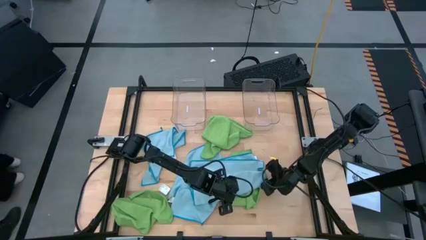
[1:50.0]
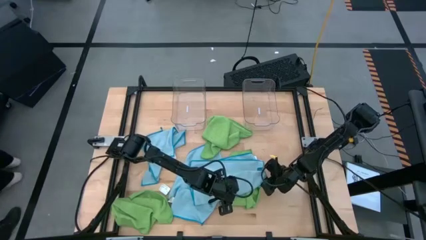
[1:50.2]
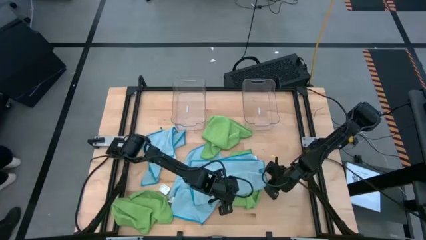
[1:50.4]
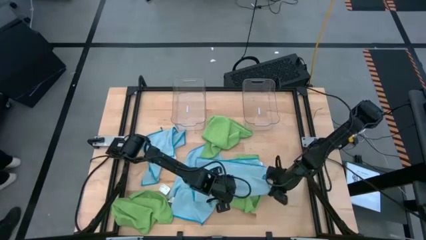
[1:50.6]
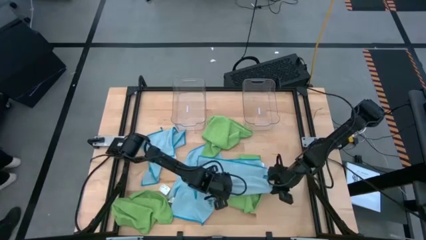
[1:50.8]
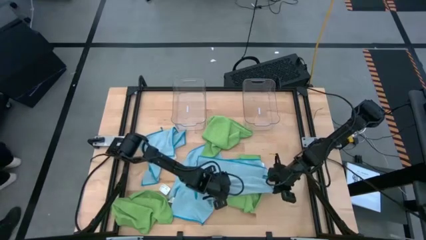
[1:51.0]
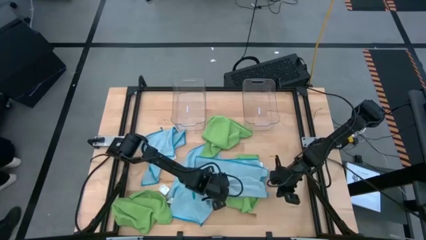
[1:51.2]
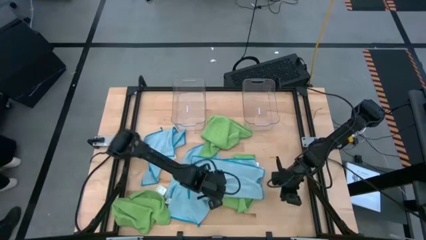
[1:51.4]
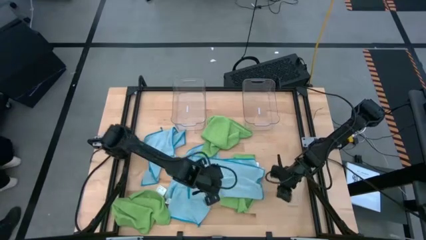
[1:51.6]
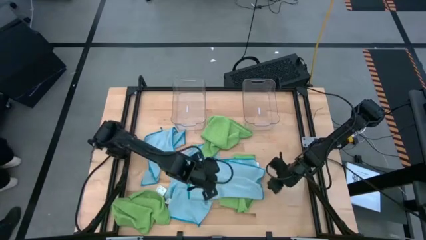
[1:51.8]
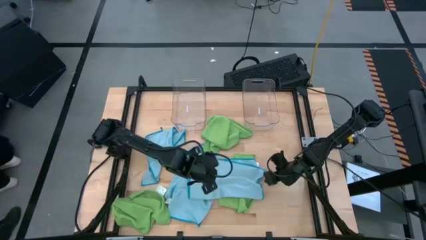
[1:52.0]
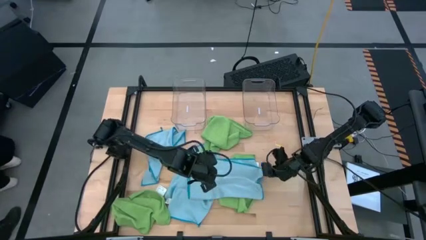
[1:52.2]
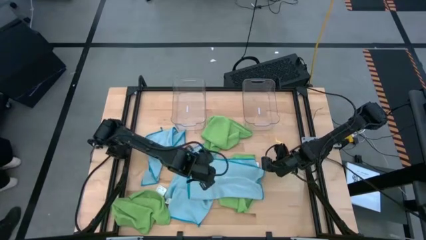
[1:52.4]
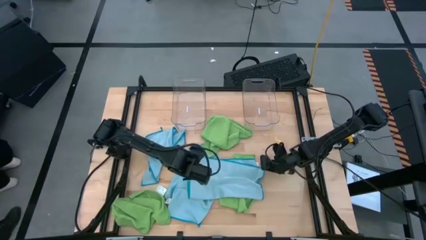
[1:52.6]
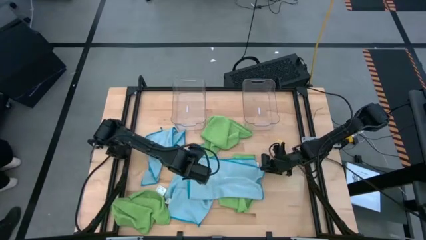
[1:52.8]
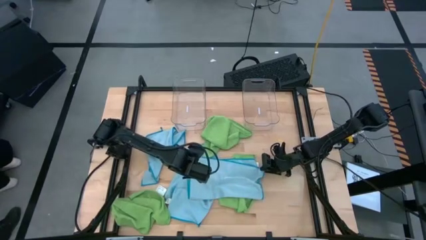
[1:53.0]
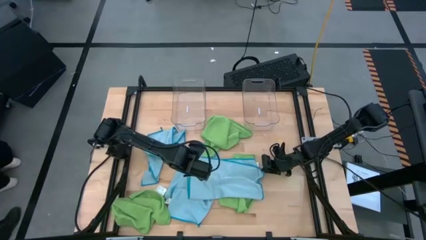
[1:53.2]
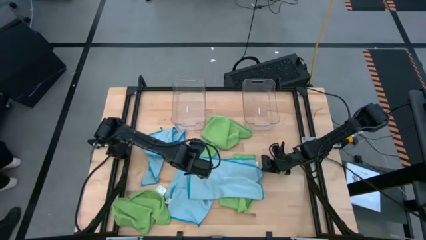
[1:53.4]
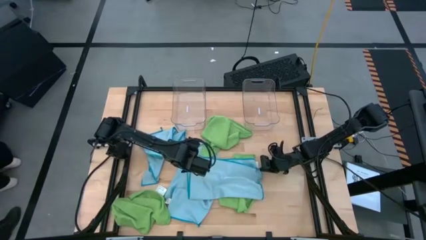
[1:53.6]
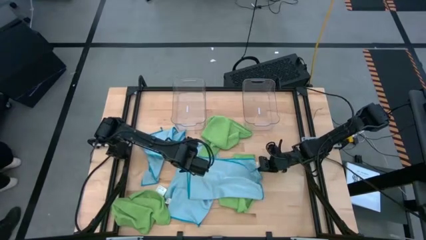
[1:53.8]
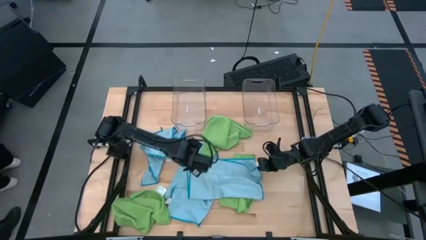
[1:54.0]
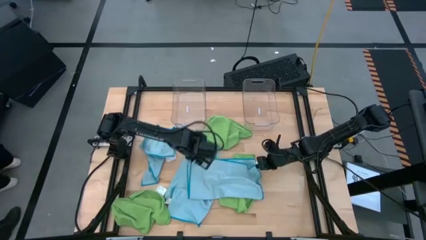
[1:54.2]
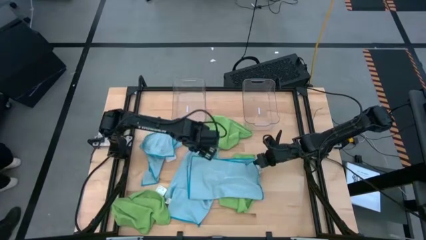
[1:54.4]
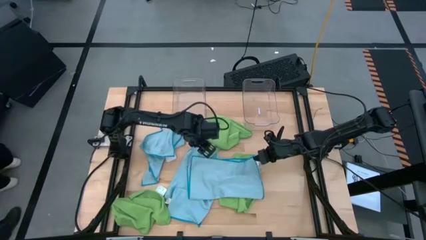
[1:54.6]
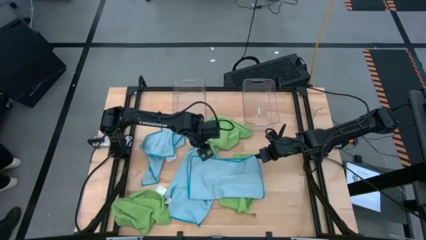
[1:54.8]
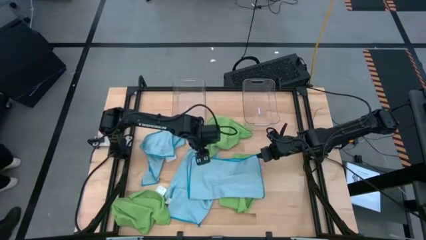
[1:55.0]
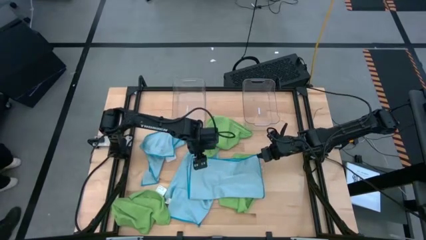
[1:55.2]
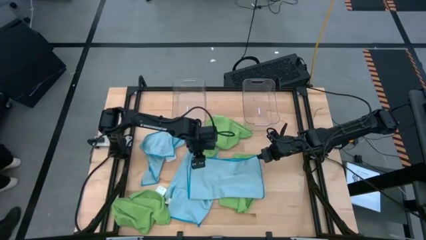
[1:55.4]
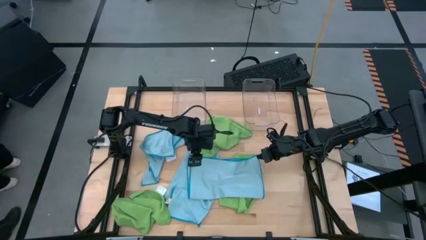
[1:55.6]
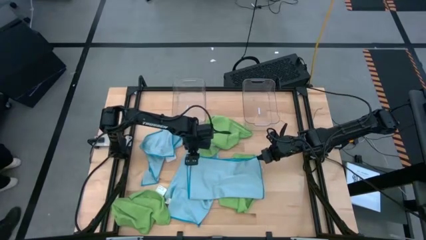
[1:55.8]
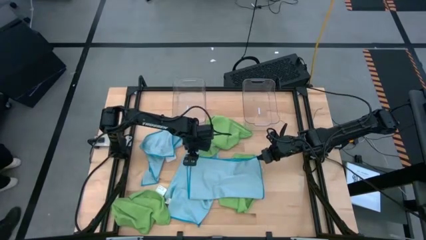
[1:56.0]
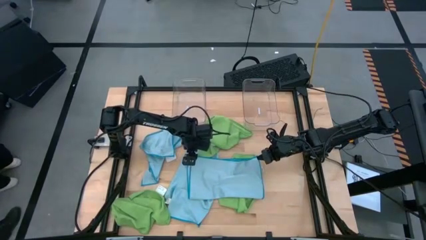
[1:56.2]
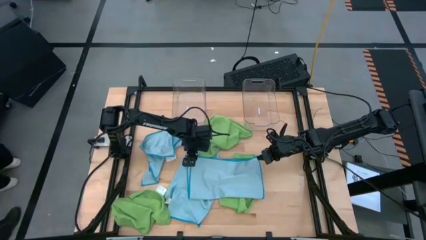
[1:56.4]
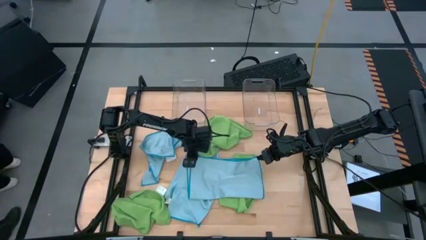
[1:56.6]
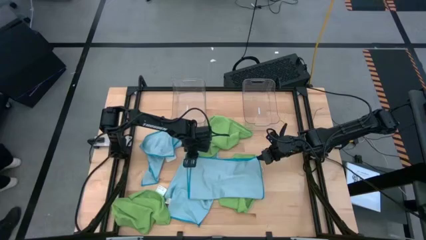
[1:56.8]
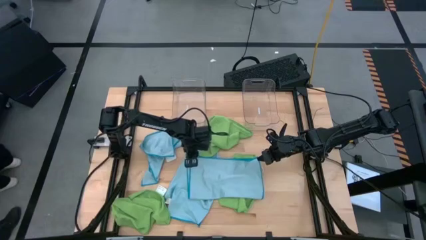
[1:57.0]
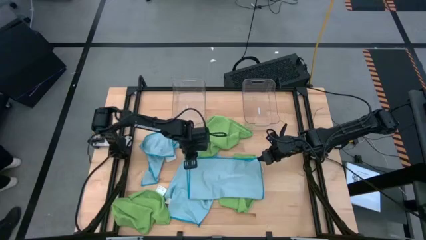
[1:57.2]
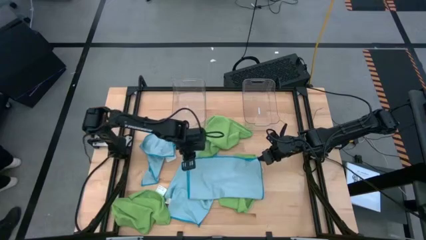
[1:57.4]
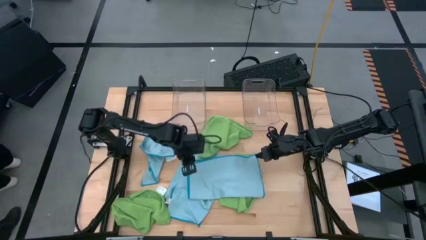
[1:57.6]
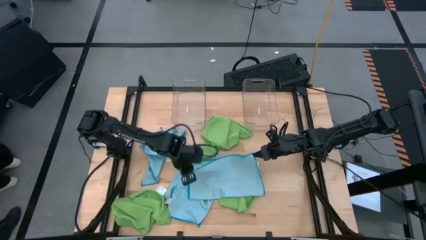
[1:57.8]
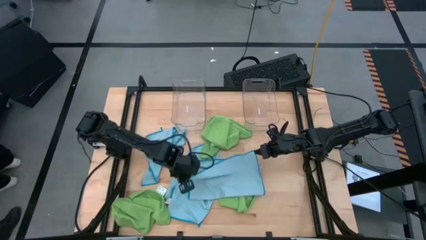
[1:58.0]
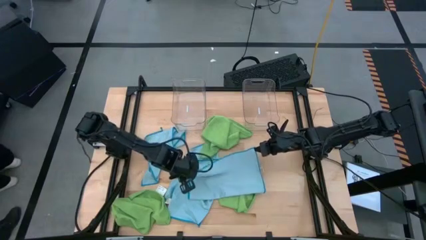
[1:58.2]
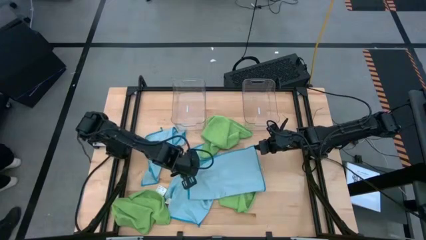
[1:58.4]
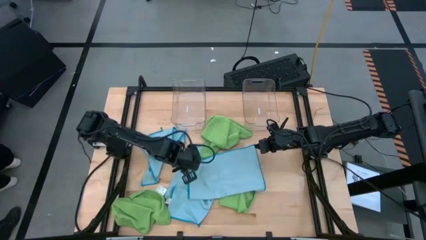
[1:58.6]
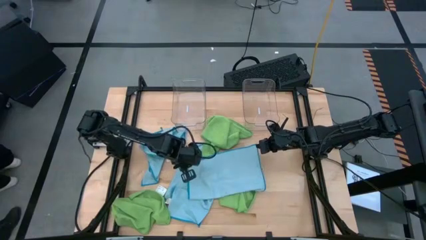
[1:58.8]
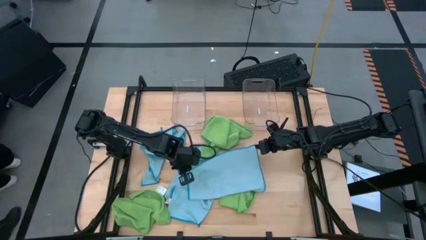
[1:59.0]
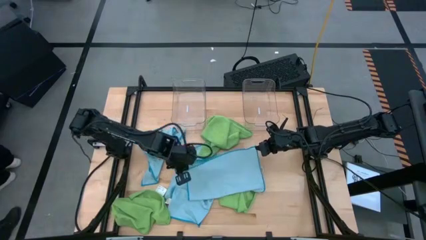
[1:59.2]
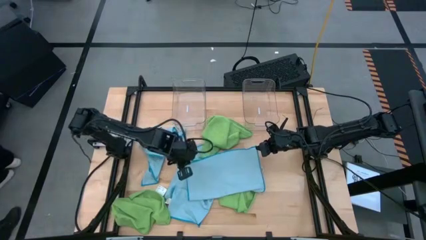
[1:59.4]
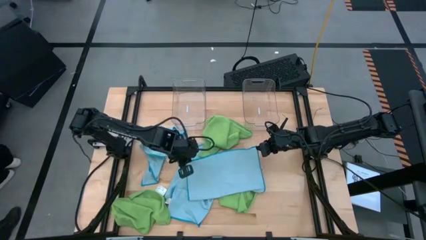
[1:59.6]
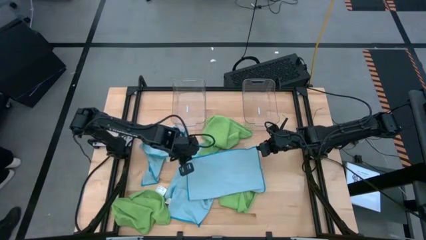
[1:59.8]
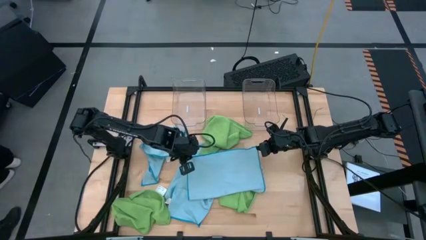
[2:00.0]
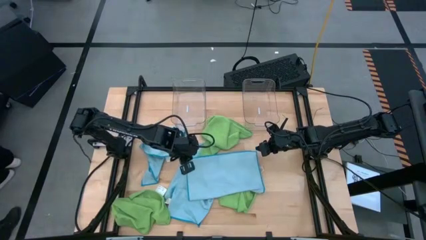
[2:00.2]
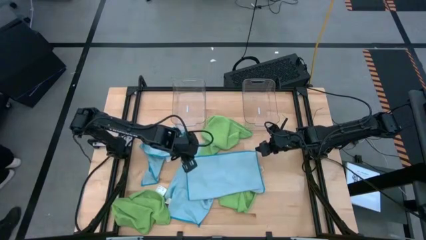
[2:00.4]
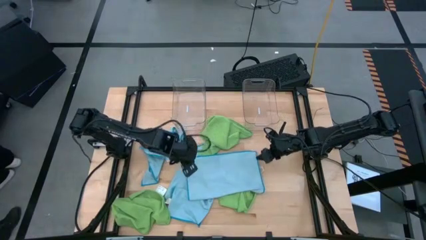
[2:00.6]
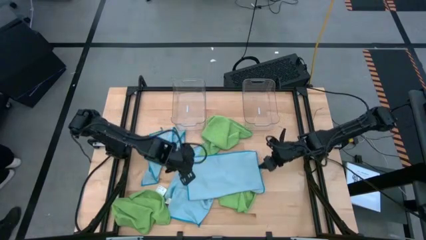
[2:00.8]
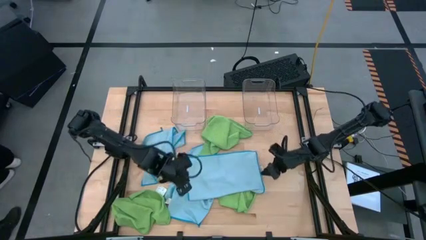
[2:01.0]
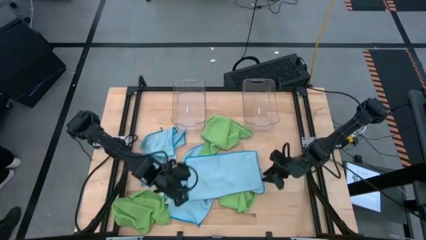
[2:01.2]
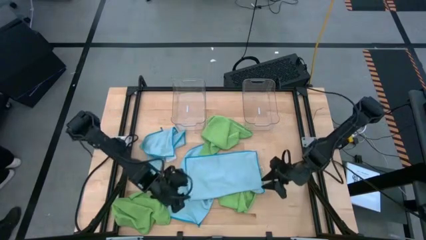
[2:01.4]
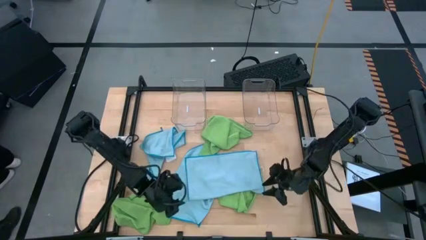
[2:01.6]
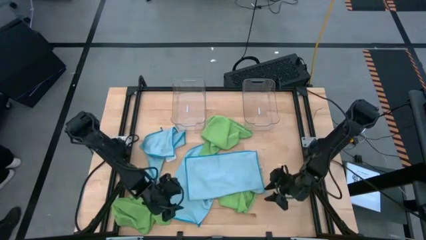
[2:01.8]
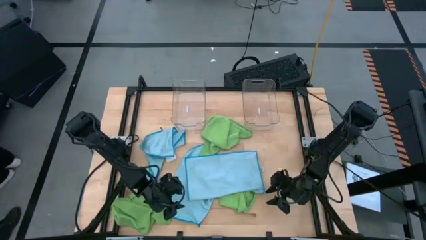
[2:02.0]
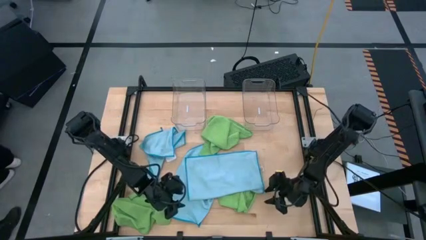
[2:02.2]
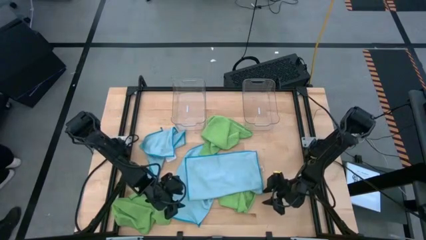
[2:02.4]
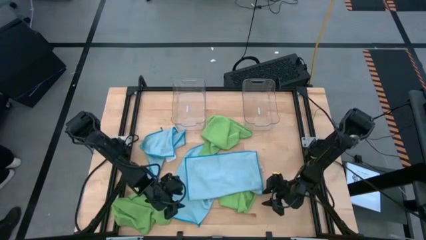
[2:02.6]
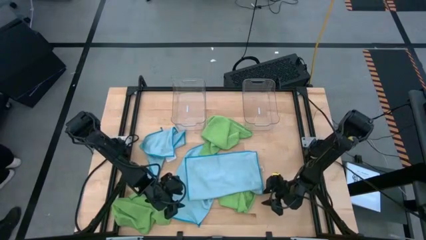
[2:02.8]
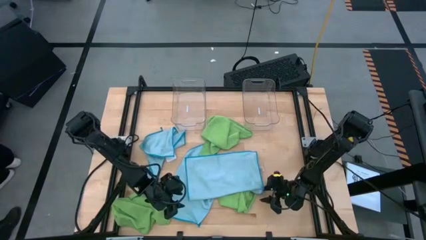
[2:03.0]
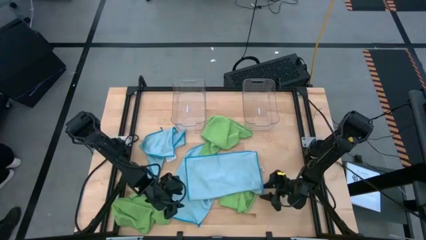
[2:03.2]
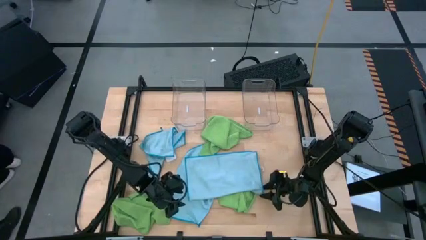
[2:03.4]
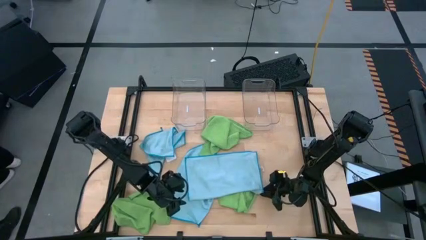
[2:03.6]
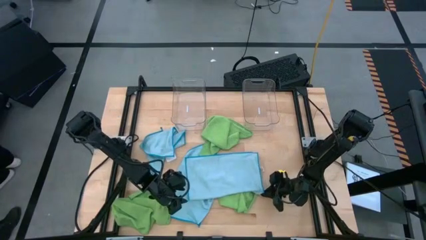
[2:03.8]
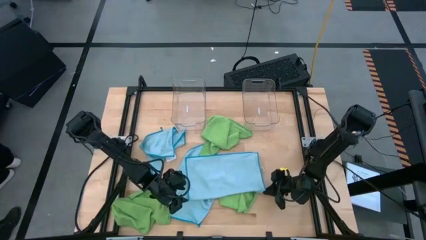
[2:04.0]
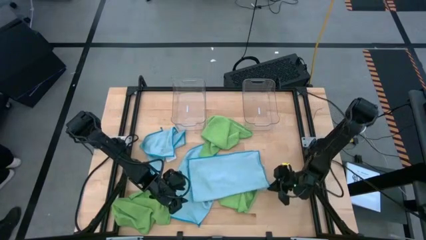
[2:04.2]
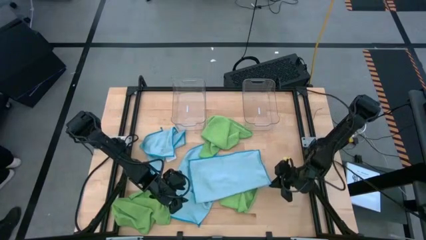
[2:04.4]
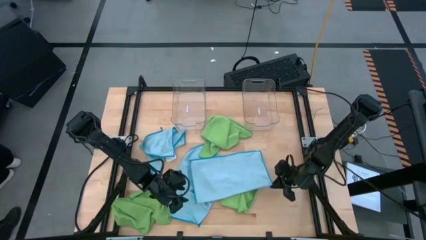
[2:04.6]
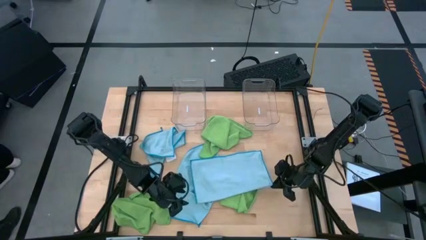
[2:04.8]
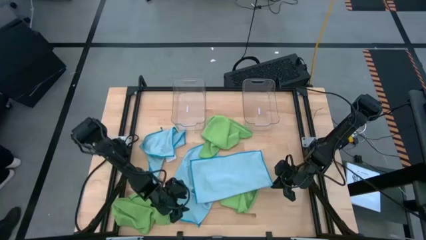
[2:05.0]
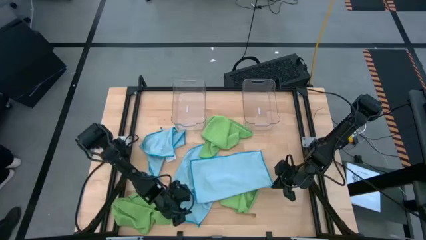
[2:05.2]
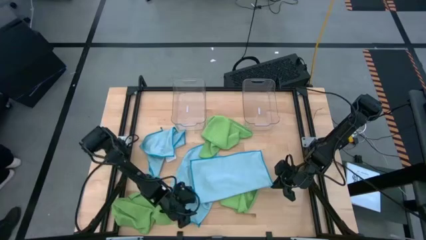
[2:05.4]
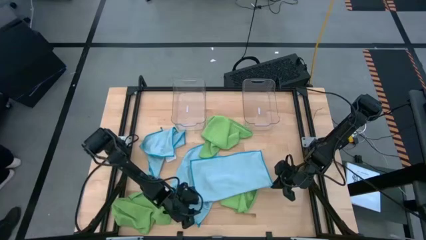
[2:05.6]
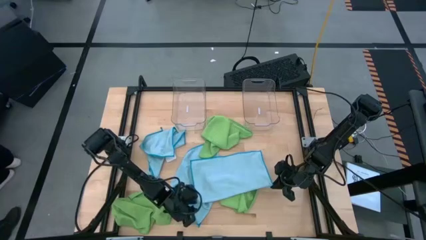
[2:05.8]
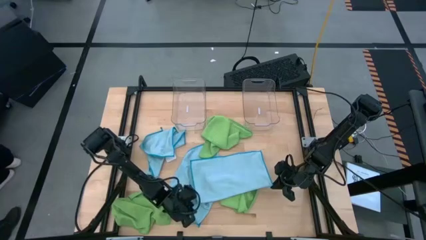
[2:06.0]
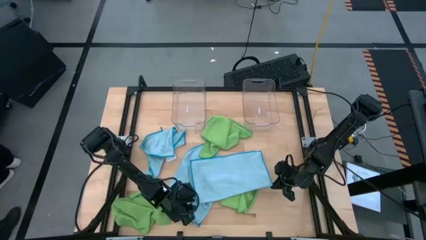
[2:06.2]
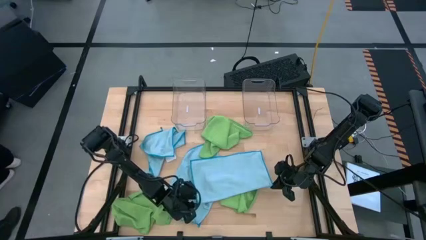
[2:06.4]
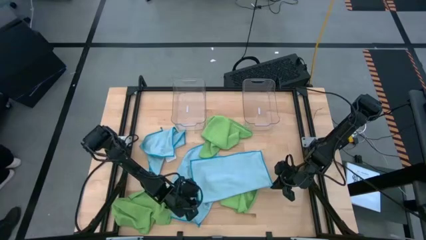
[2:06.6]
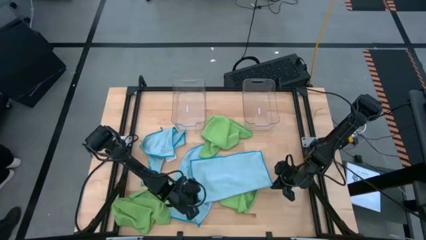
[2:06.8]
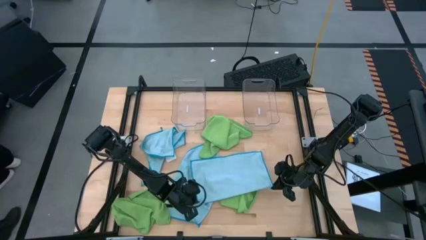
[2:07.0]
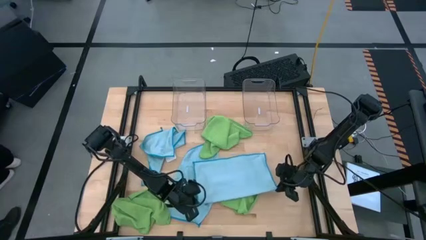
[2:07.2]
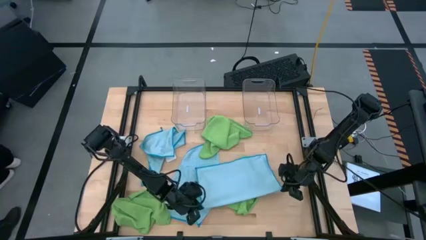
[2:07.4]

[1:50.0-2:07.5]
Task: Fold microfiber towels
Fold the right blue microfiber towel
